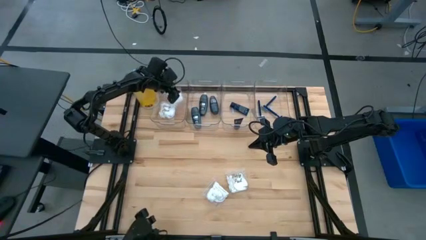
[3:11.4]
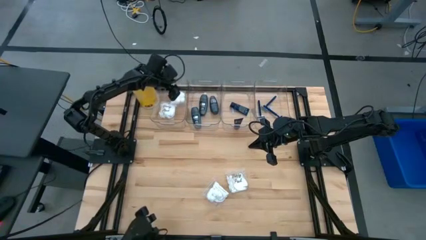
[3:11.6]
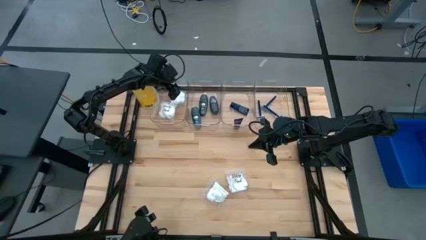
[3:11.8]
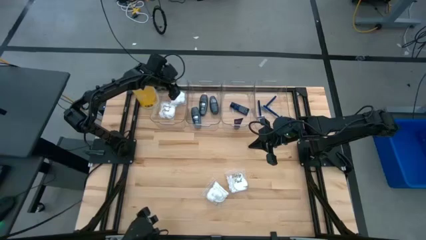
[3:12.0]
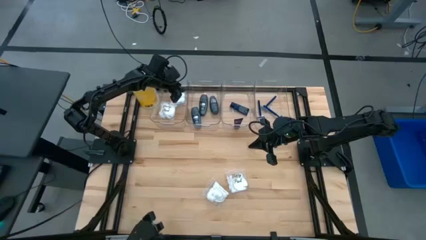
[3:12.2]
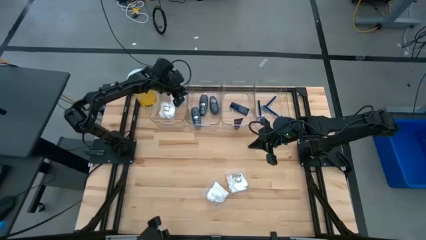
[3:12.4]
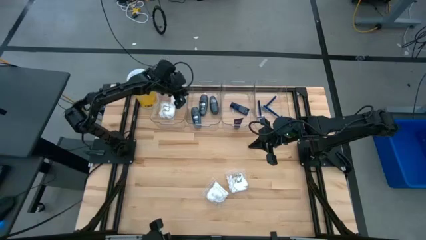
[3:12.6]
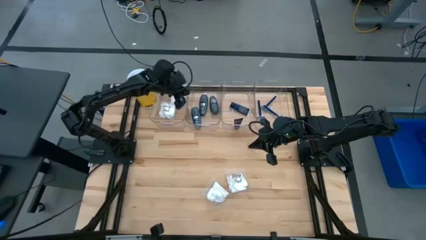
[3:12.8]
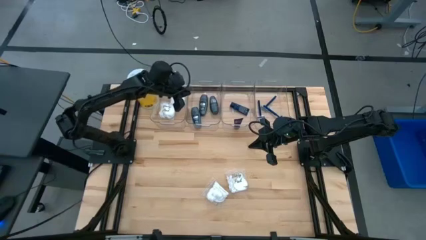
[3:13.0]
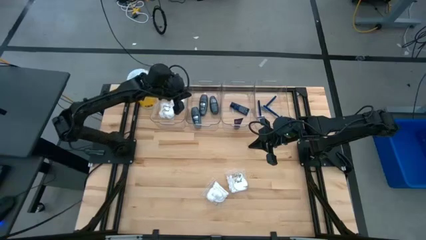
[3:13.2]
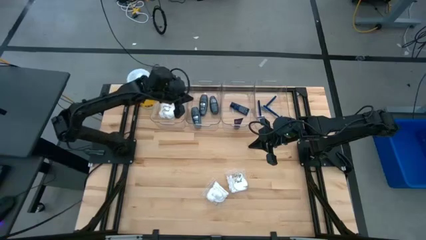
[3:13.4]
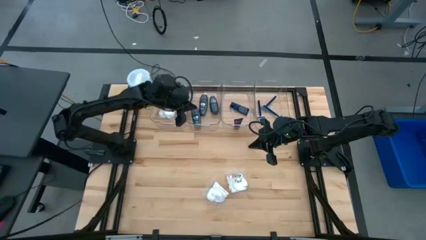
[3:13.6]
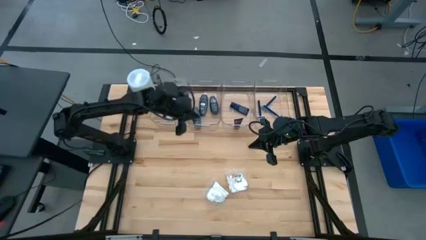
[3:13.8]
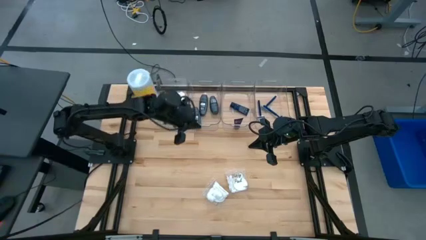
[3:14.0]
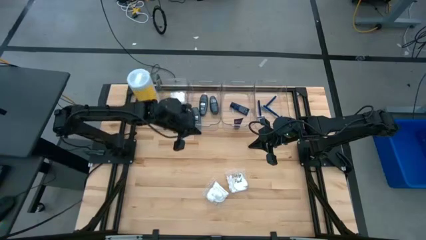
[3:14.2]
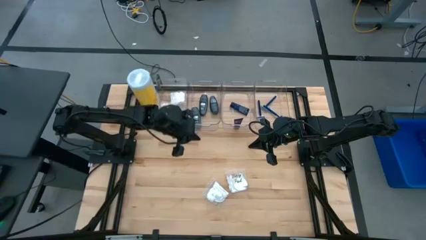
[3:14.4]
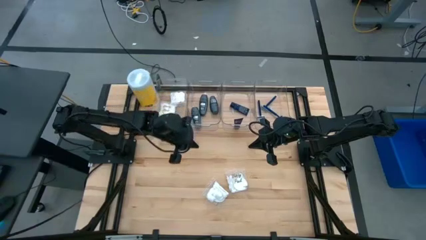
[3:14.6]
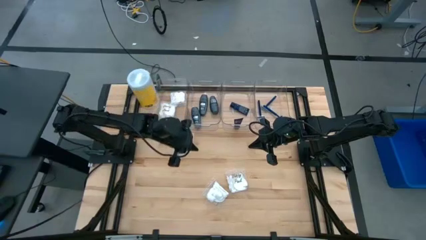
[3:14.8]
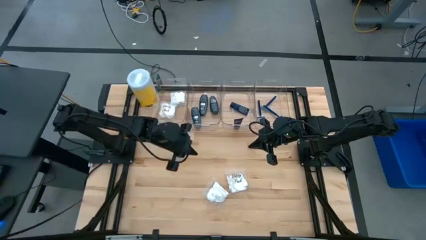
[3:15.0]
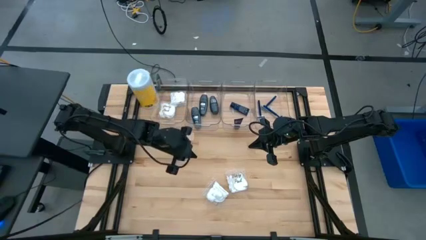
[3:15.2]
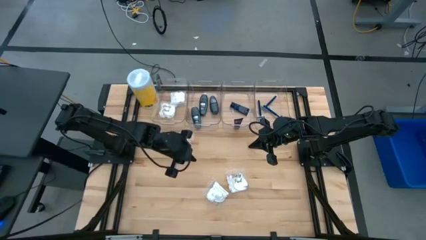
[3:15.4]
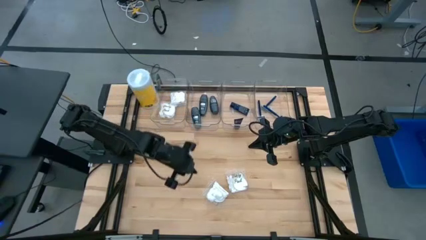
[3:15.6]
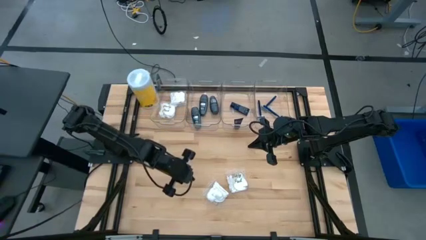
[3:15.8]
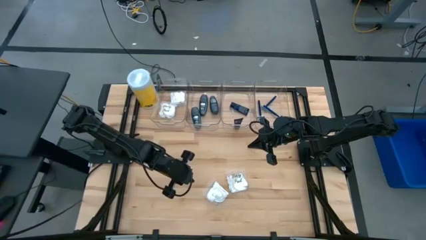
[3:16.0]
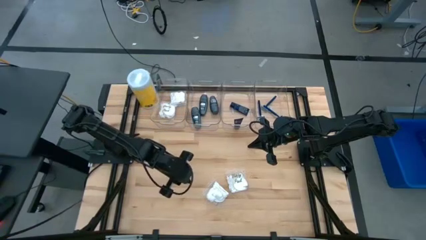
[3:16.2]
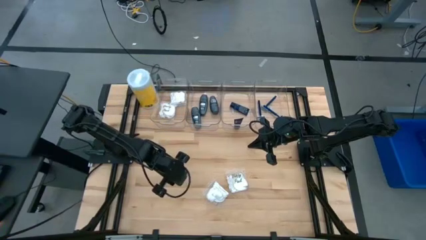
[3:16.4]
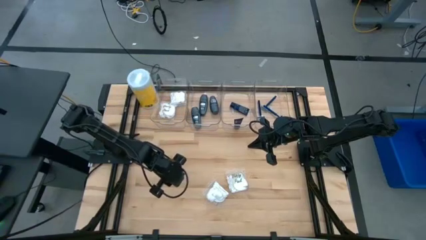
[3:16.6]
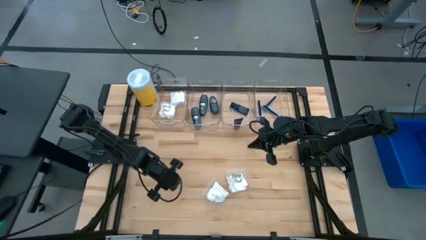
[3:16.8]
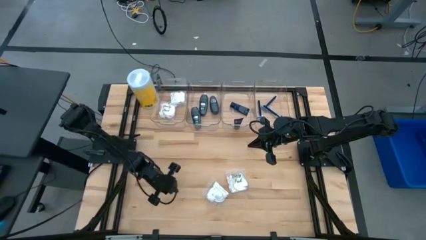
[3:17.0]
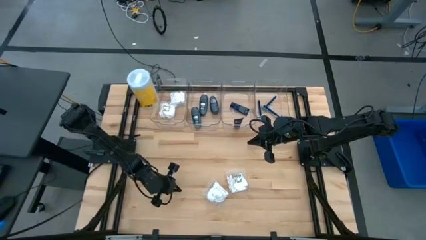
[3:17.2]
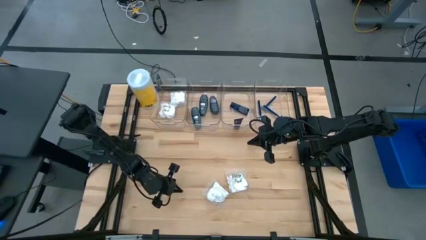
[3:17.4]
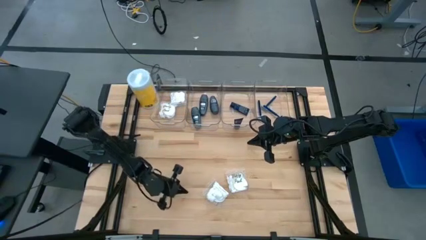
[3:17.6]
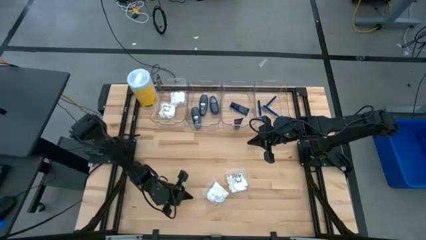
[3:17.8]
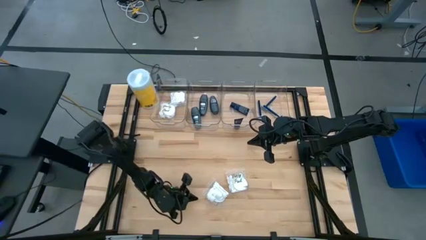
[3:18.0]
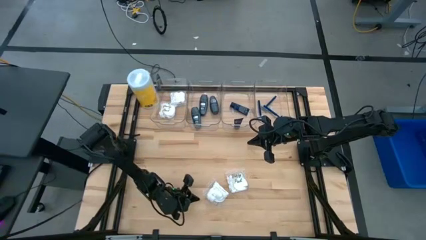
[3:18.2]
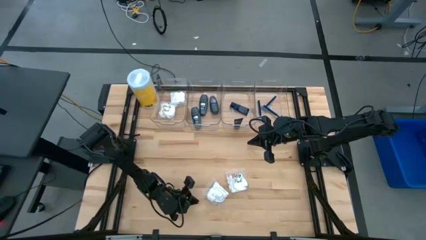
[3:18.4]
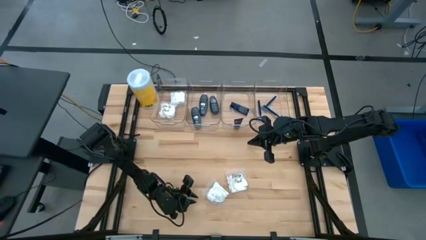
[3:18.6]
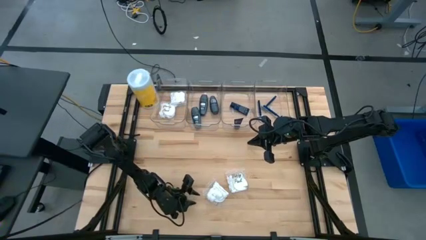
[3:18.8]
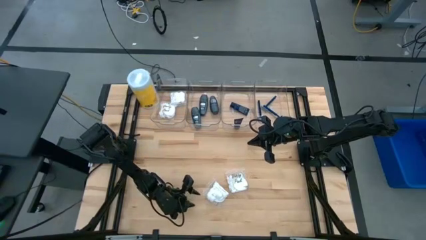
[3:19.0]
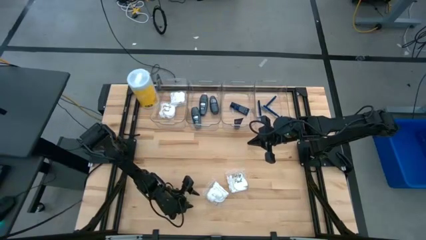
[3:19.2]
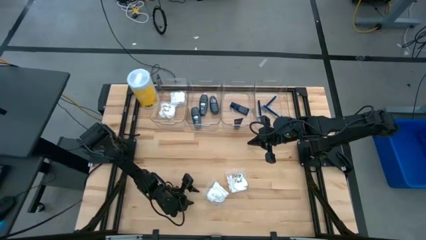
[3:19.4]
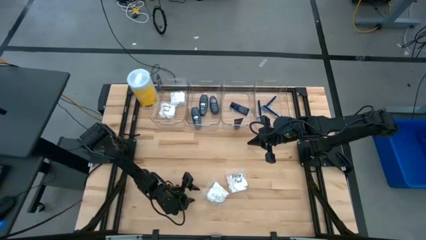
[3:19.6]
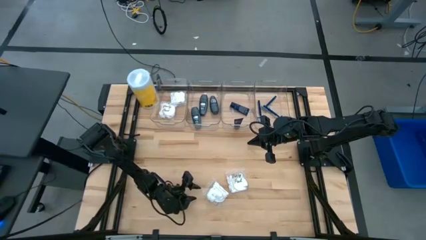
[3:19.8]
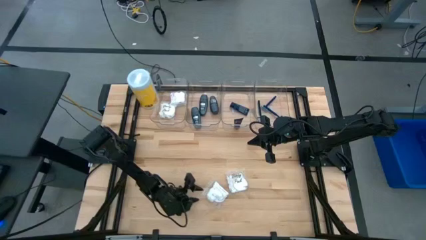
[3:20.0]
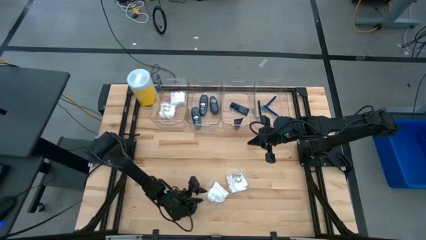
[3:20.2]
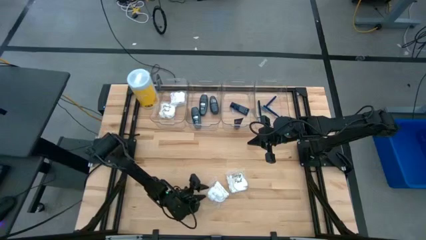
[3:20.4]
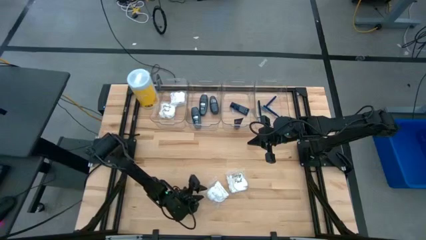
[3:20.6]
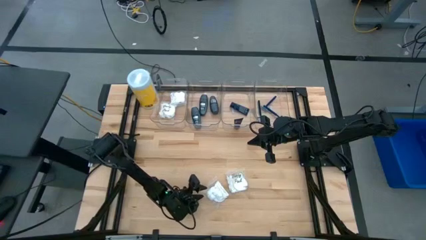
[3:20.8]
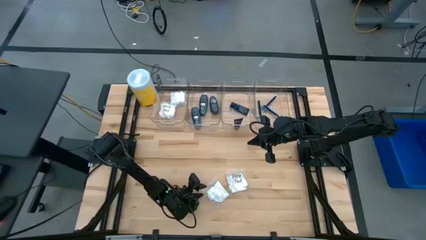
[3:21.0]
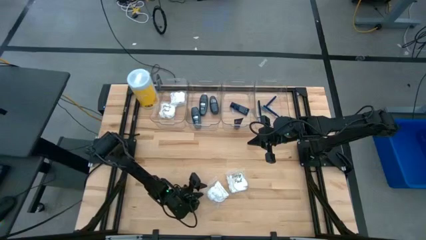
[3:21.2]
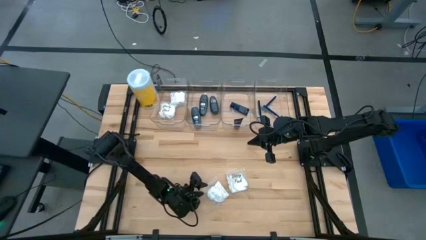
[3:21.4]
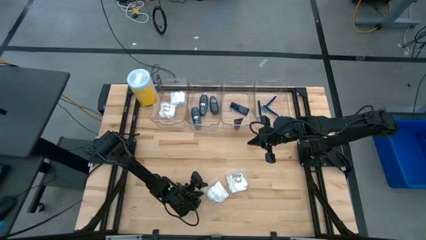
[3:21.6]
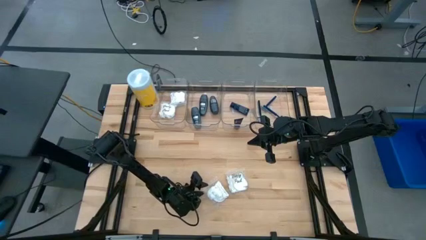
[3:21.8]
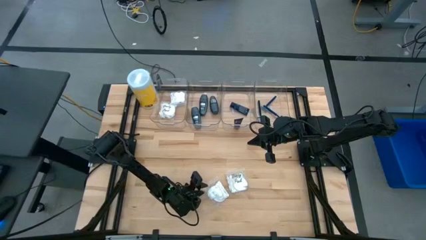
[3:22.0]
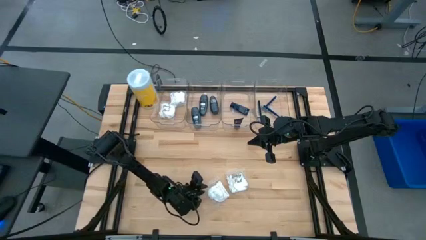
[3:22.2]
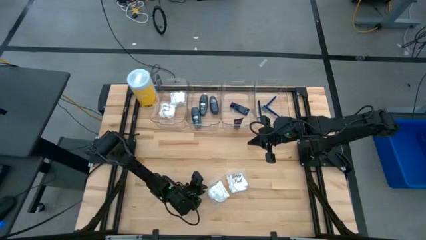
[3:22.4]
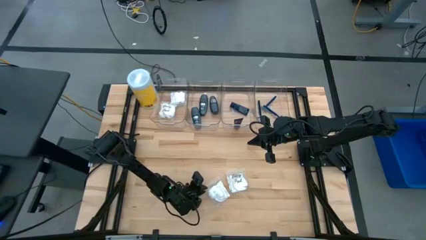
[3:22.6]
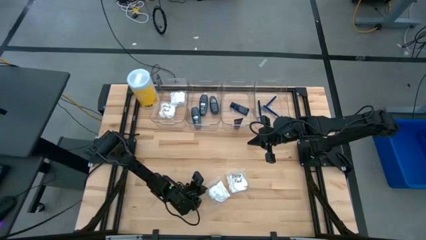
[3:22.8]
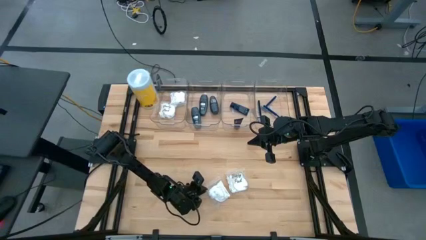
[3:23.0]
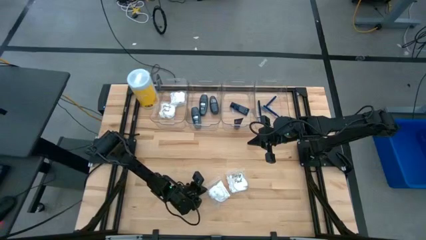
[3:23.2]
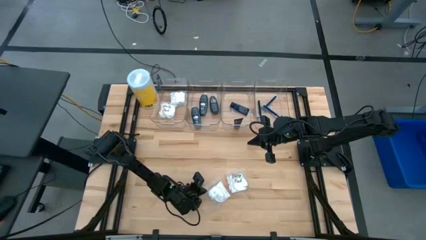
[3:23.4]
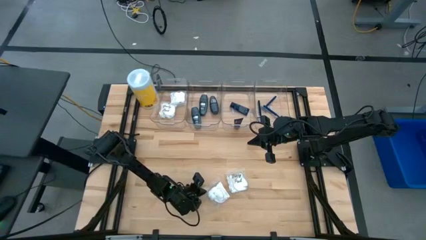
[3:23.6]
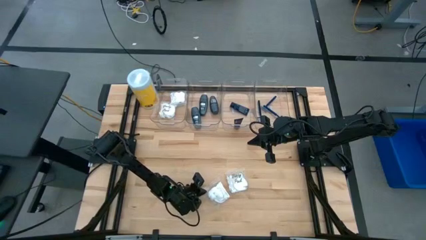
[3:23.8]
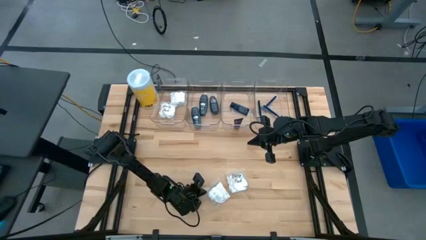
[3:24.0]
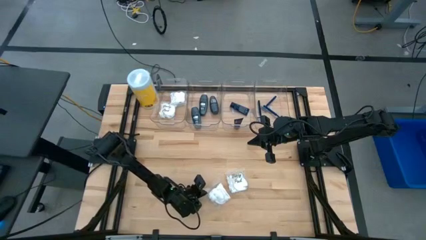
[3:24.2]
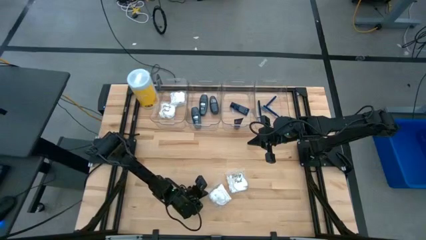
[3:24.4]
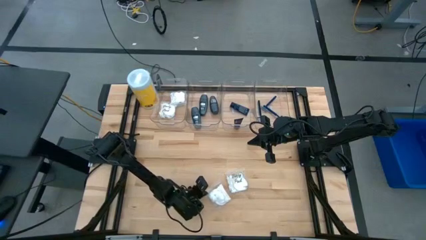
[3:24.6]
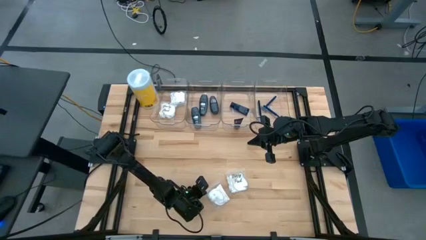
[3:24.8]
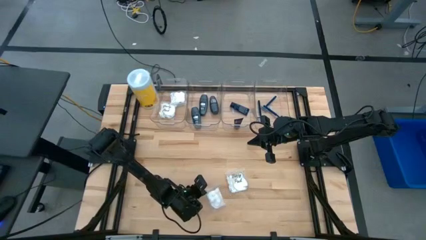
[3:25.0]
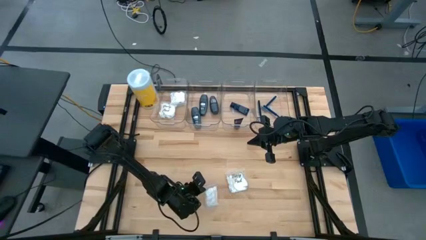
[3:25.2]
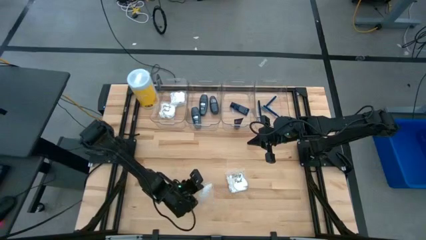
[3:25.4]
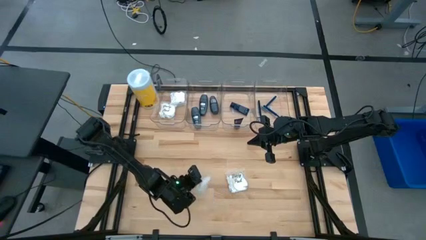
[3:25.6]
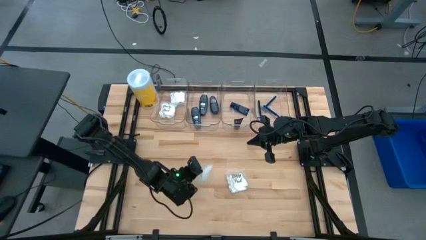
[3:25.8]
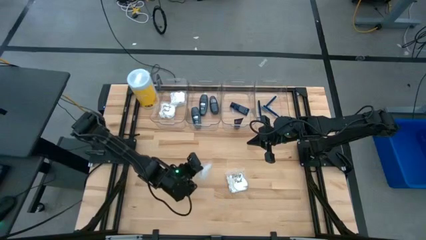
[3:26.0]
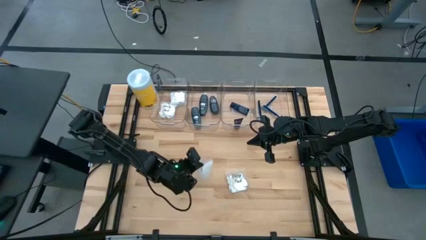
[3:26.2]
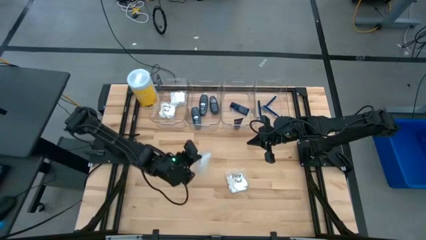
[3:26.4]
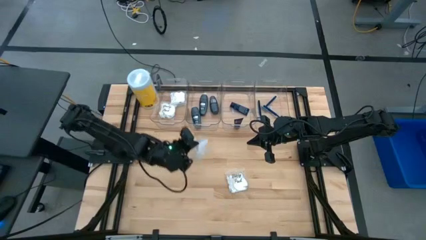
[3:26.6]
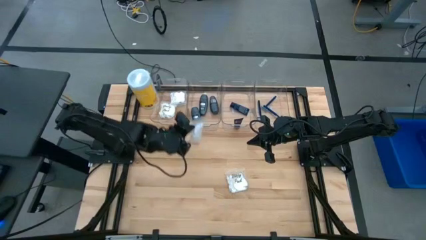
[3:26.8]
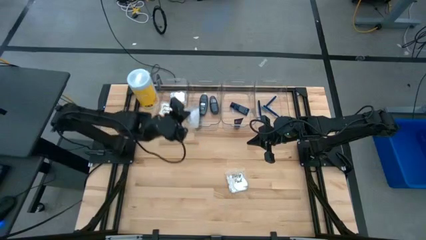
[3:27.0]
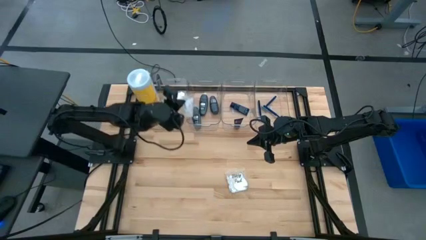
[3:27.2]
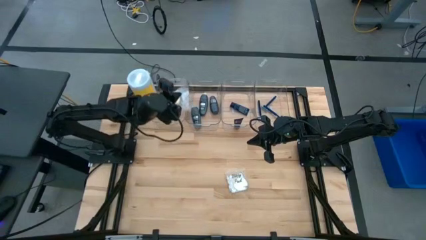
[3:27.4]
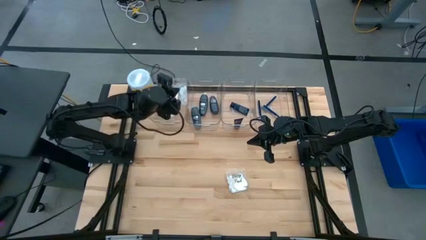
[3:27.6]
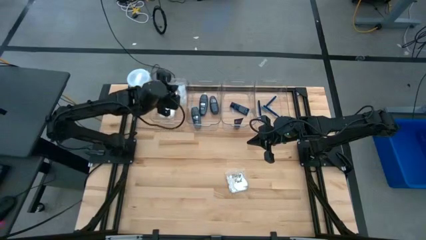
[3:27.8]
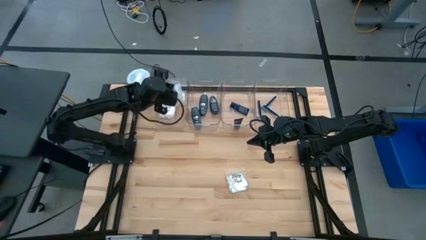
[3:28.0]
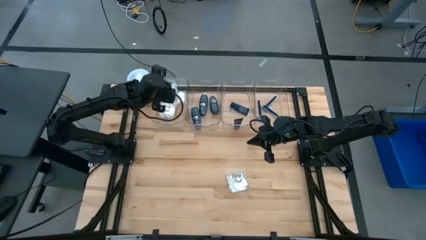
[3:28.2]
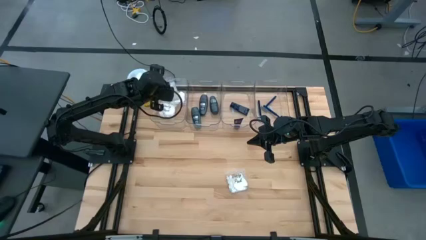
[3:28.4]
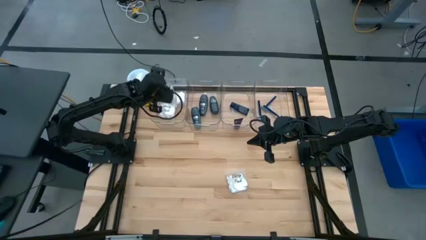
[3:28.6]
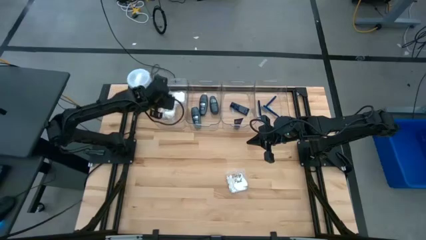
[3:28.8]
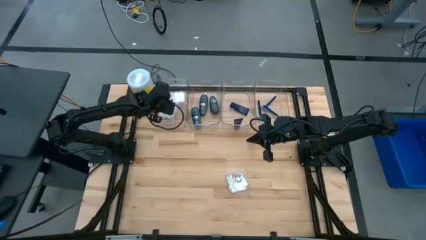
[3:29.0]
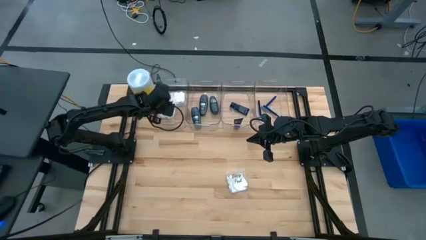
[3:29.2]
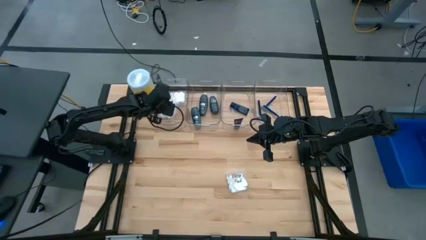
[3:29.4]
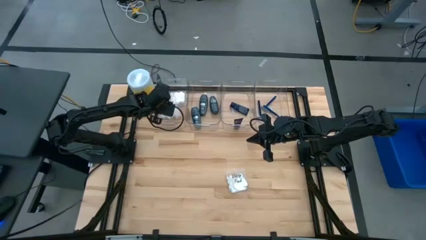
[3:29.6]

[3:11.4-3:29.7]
Task: Pick & Place Travel size toiletries
Put the white cotton pack into the left transparent bin
